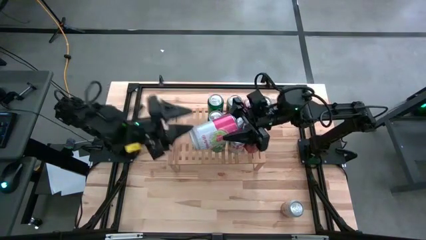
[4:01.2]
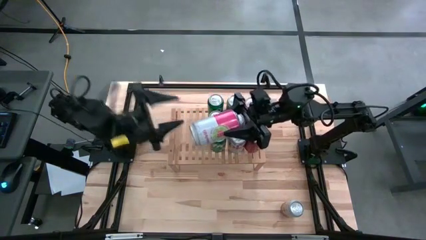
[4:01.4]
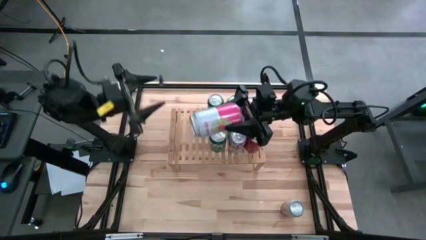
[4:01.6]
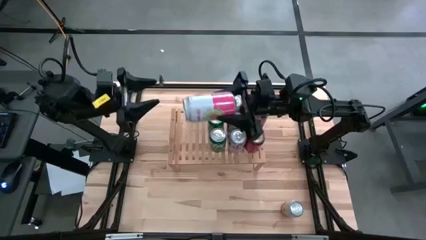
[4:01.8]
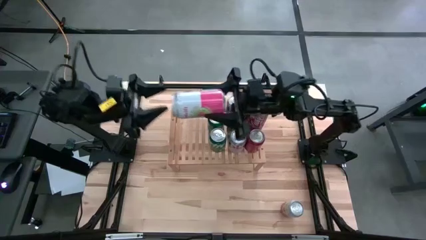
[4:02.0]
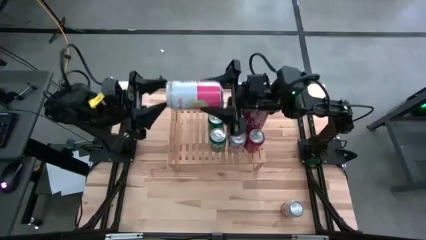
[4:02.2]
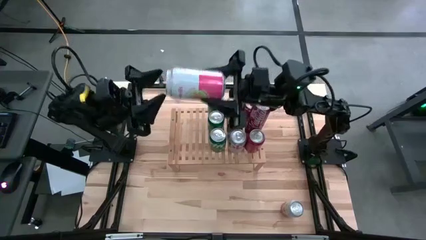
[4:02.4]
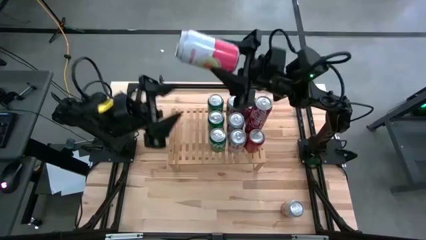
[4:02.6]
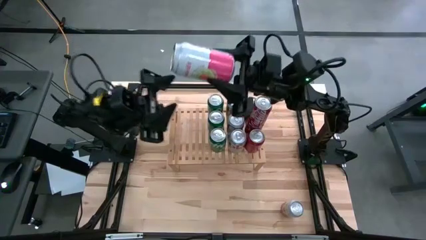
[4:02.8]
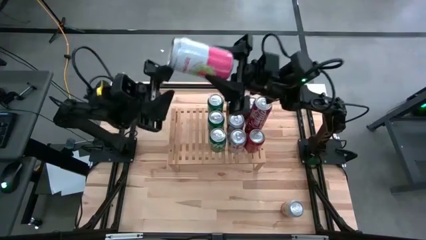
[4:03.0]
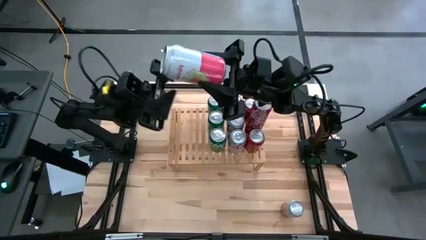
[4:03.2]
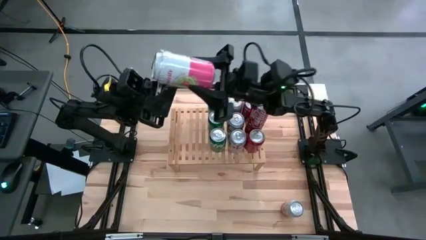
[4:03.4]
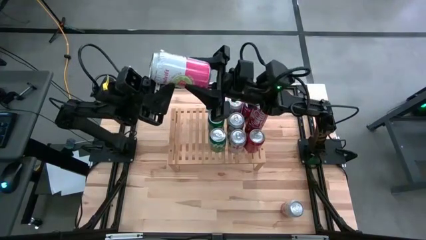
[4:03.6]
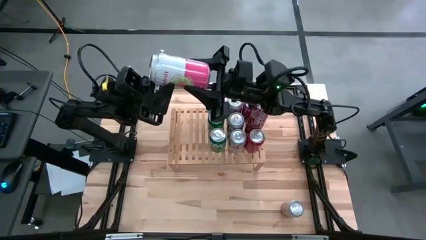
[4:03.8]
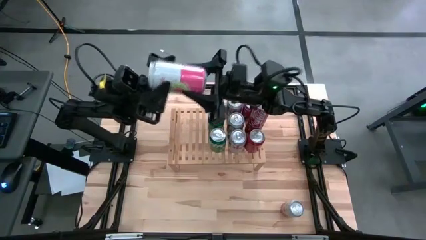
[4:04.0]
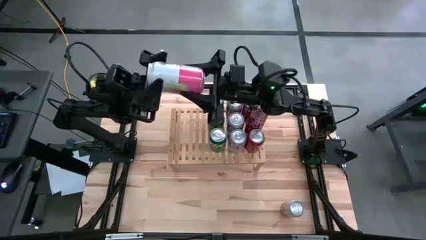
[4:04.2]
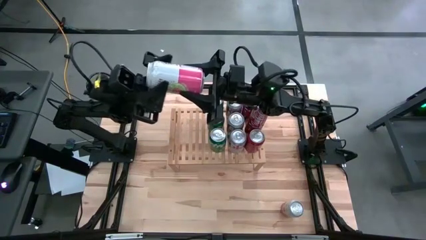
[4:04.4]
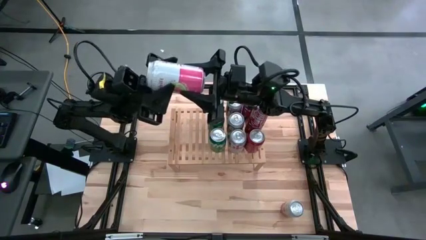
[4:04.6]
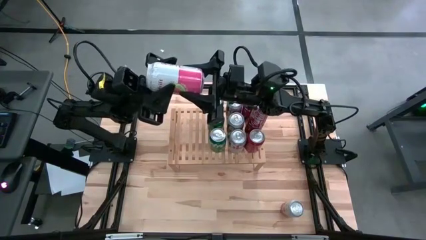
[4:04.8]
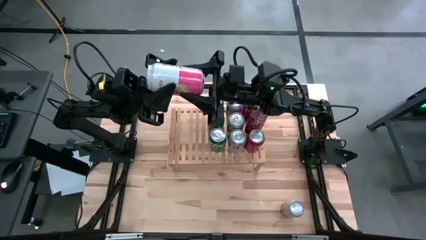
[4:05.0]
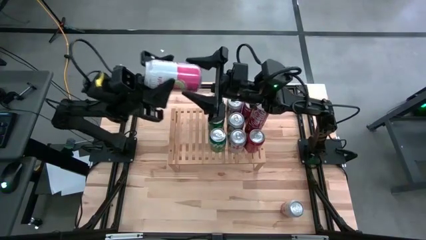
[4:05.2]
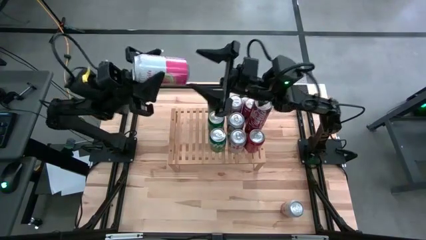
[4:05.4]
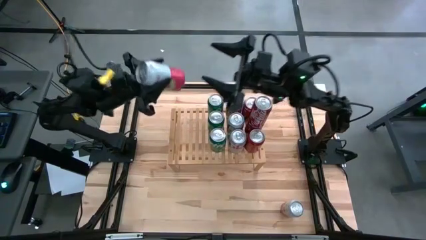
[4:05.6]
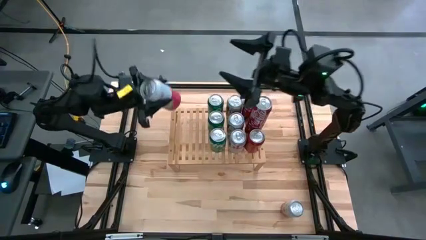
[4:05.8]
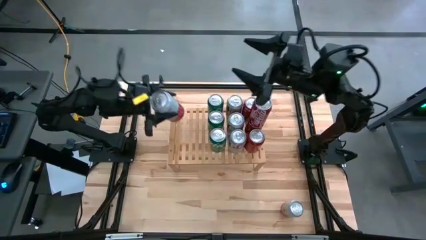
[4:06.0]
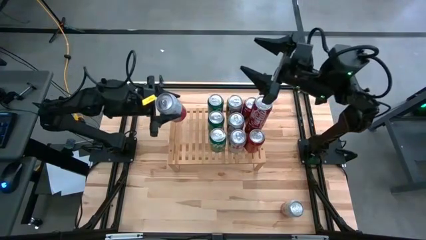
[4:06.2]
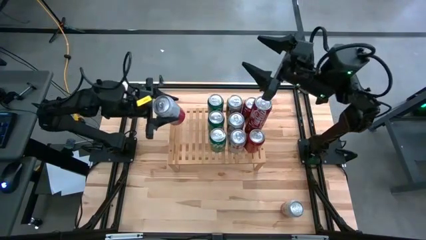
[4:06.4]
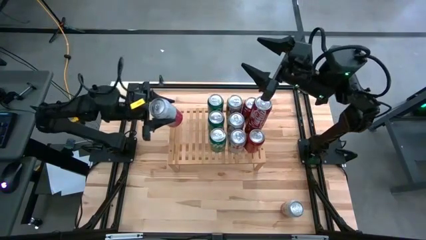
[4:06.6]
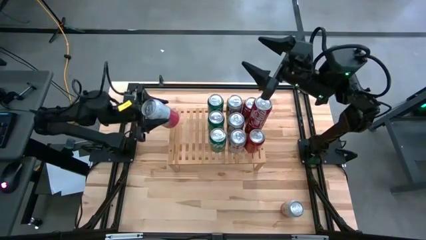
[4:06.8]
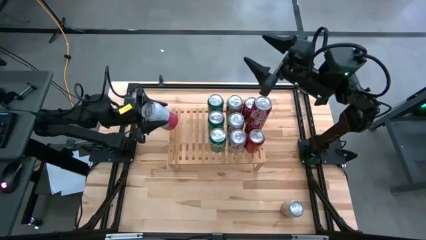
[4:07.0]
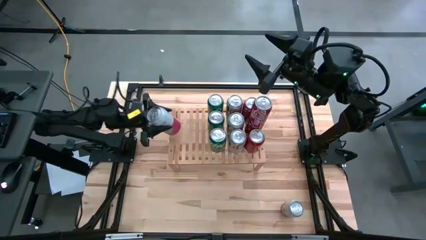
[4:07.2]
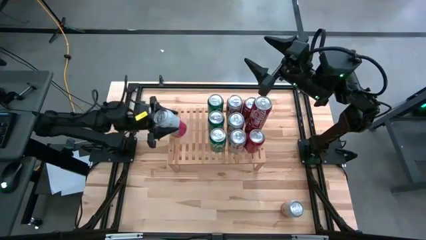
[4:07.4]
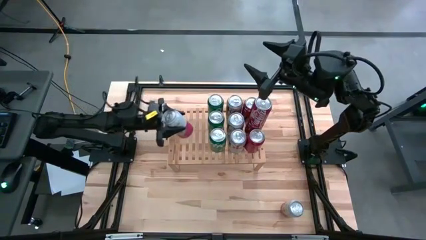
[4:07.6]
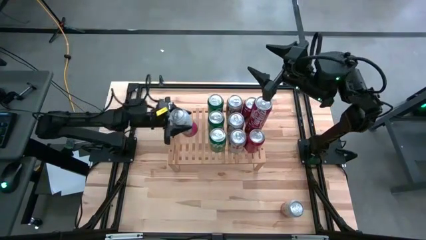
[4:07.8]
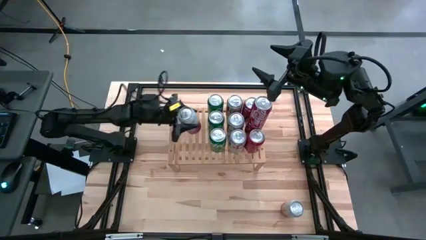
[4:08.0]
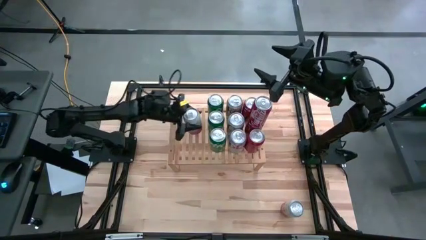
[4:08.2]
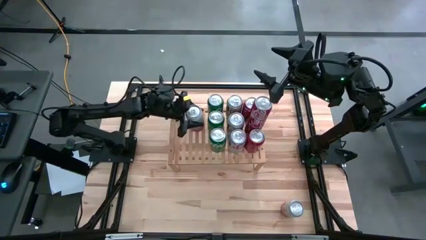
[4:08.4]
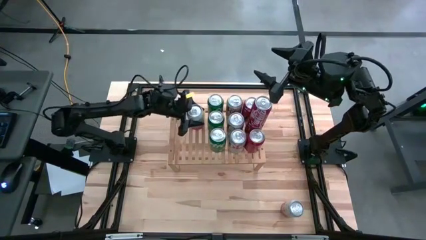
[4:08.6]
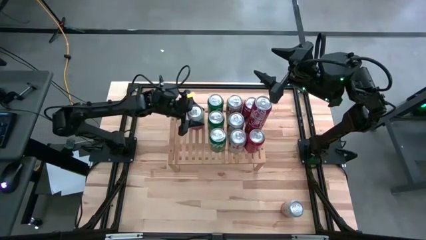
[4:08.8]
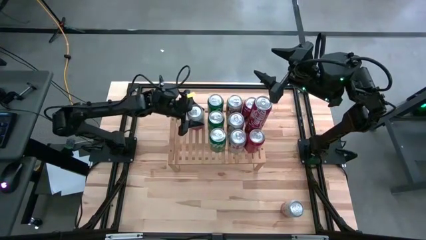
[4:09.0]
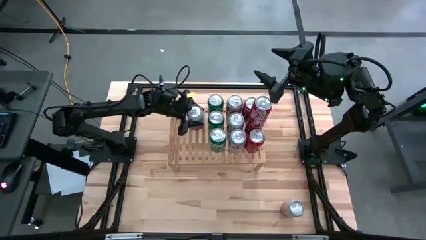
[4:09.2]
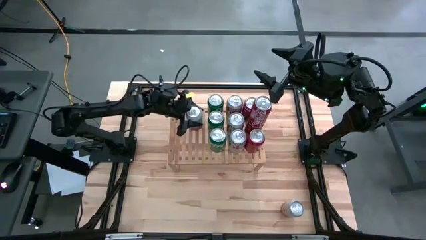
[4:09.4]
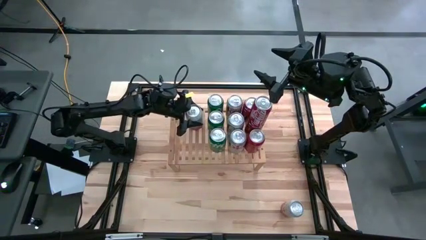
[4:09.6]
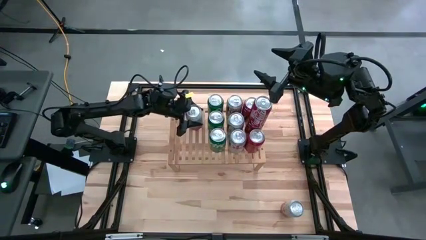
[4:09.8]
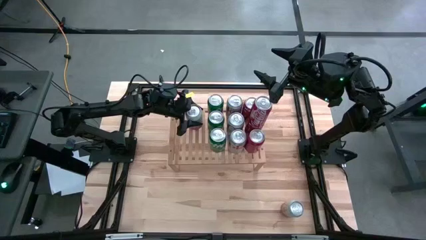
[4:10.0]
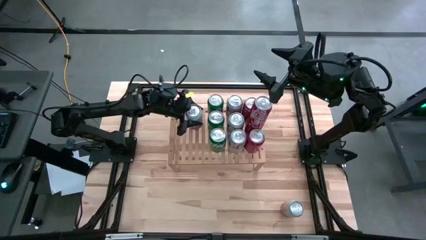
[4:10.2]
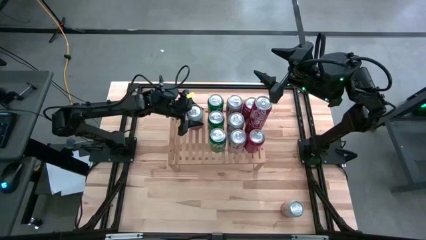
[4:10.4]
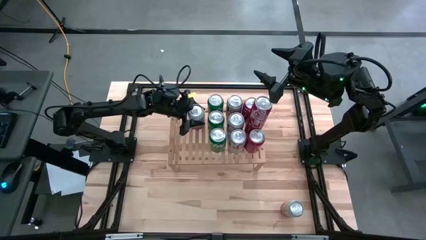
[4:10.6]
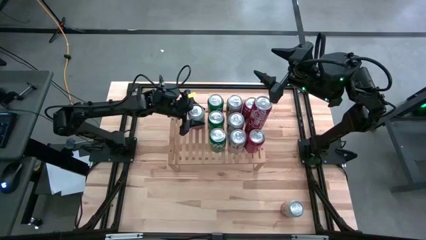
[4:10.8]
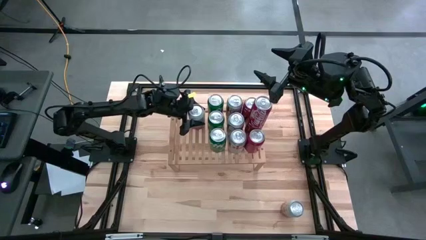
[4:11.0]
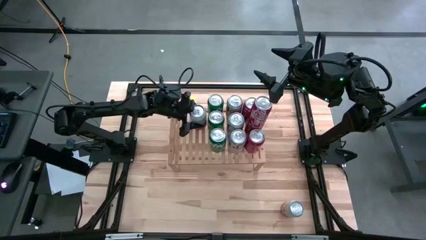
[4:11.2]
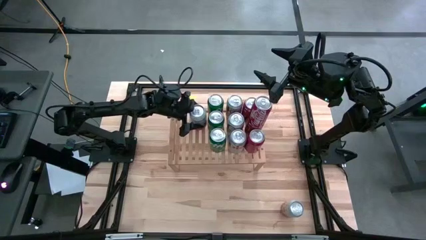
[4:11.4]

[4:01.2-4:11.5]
Task: Place canned beverage on shelf
Put the top white pink soda can on the shelf

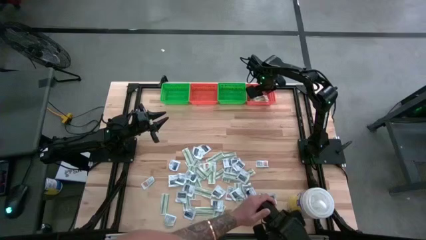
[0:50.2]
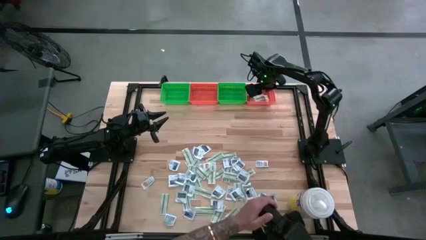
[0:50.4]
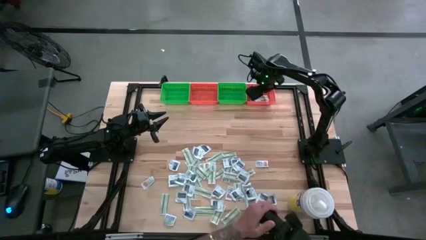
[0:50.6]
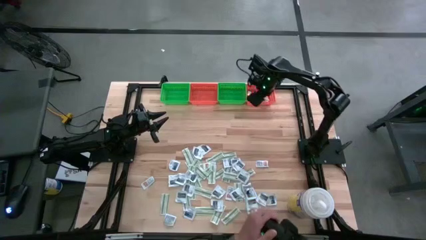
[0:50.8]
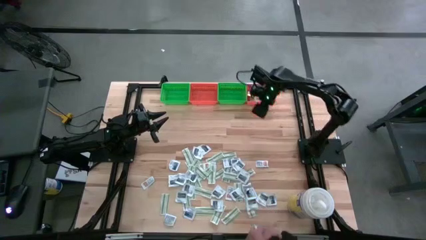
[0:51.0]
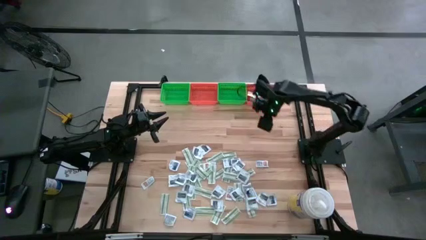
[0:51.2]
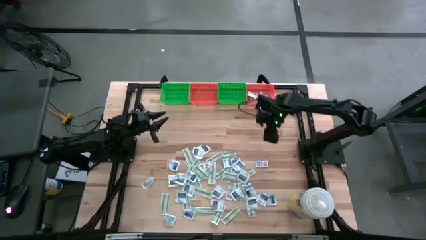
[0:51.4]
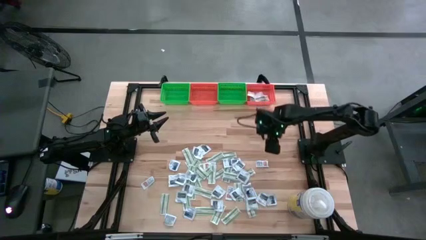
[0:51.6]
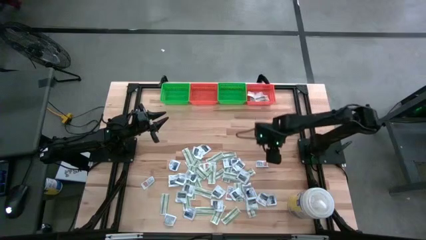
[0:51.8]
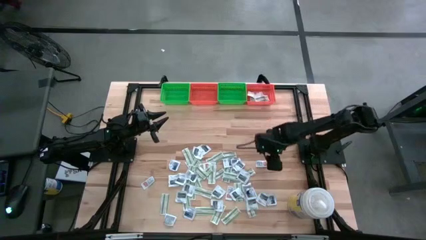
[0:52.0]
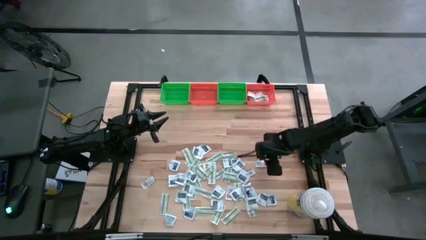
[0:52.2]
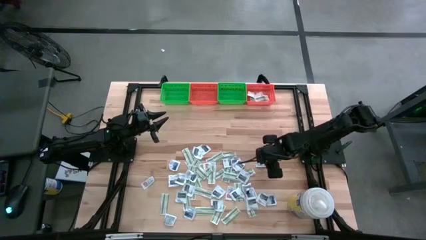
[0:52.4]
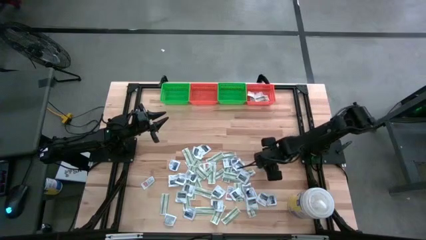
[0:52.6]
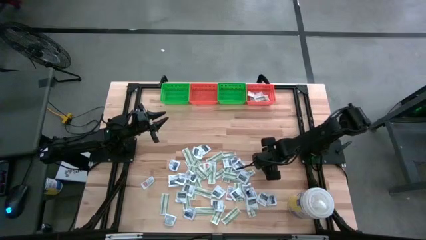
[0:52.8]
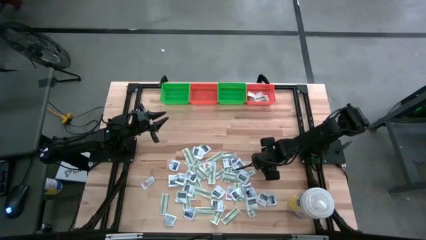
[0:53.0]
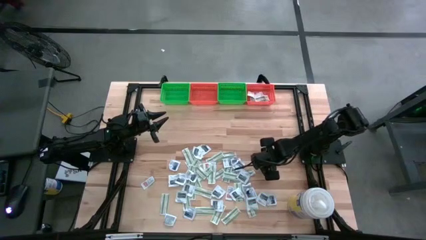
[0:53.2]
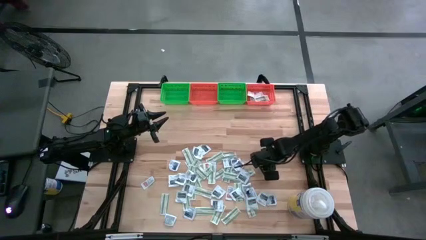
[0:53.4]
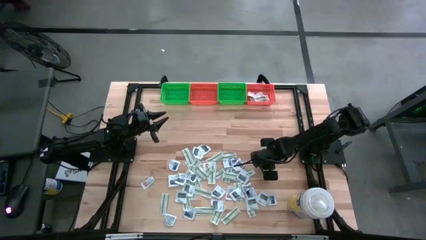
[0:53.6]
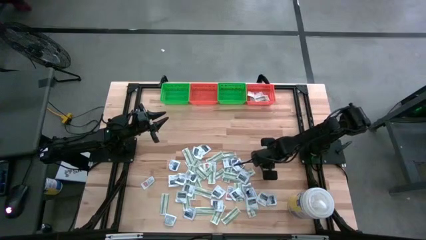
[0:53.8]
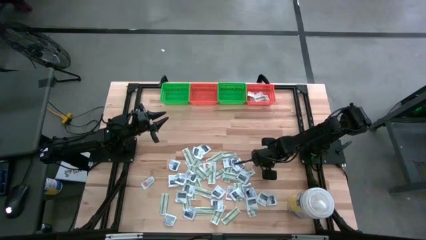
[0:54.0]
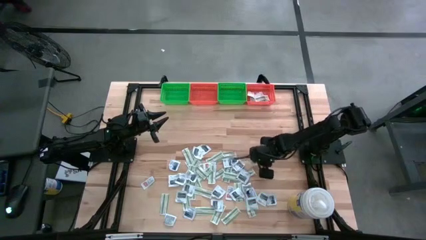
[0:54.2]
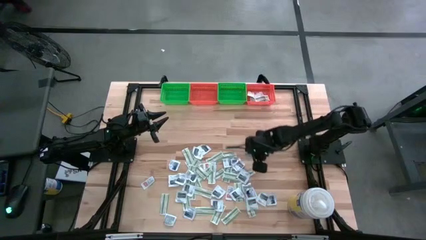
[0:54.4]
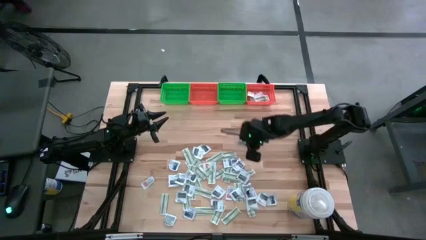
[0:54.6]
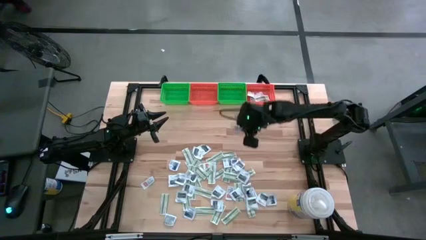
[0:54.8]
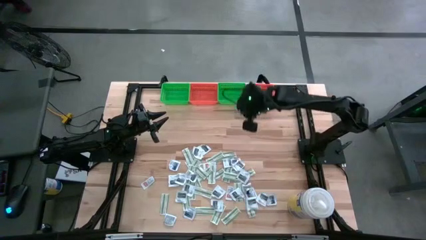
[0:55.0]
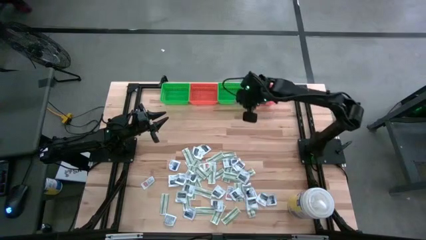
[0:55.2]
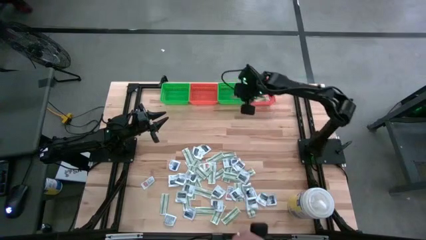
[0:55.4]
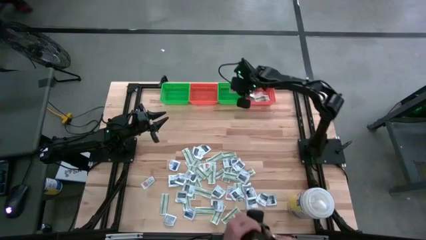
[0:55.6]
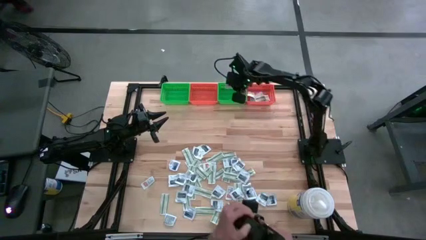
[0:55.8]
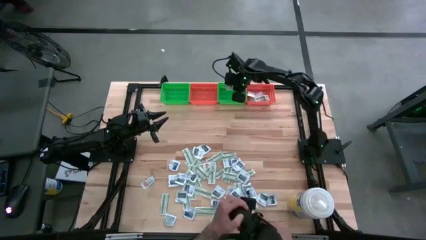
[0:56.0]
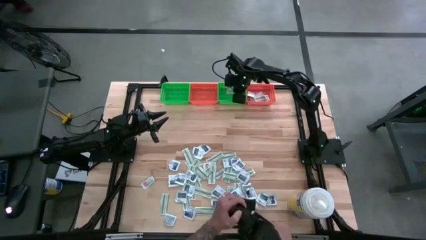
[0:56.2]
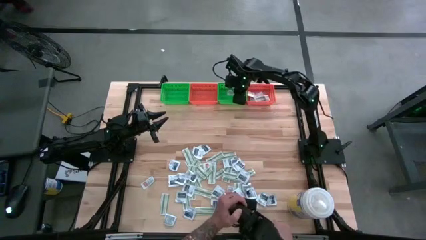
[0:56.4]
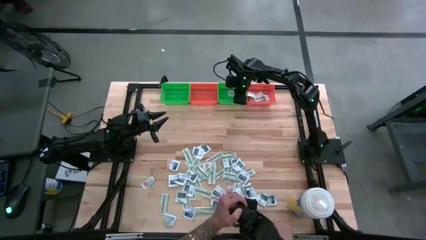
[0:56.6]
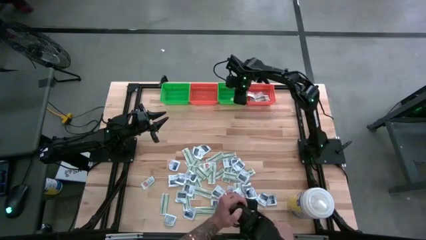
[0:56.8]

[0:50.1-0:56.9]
Task: Pick & Place First Aid Supplies
Put the orange ointment pack in the right green bin
